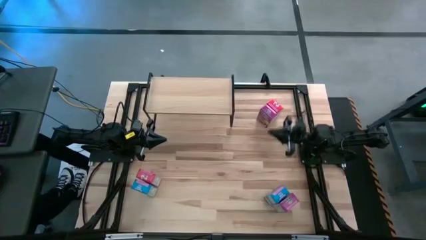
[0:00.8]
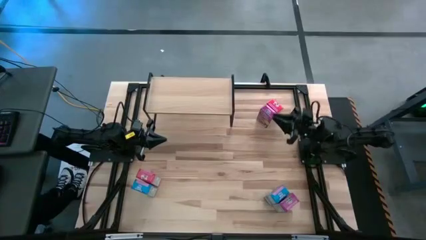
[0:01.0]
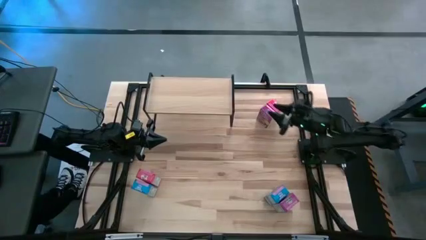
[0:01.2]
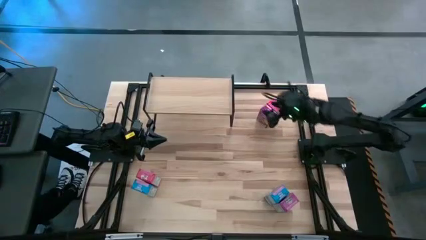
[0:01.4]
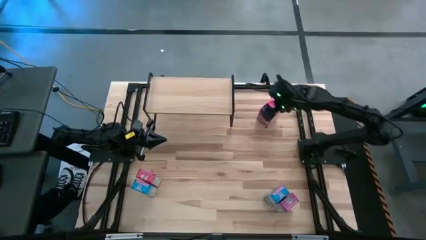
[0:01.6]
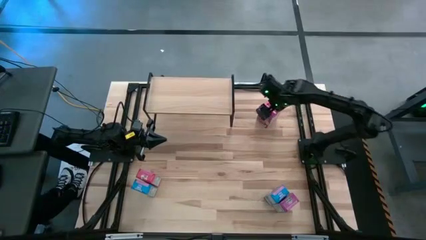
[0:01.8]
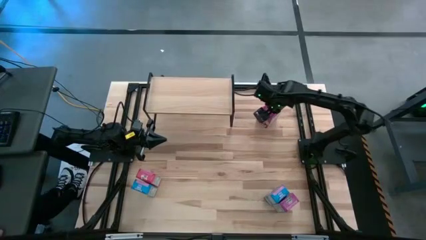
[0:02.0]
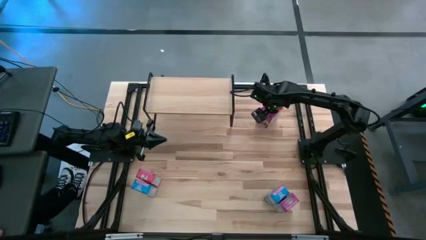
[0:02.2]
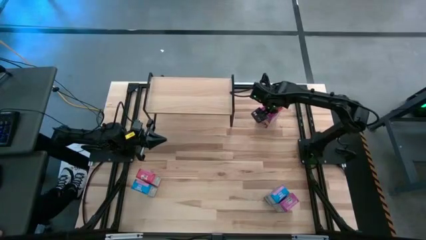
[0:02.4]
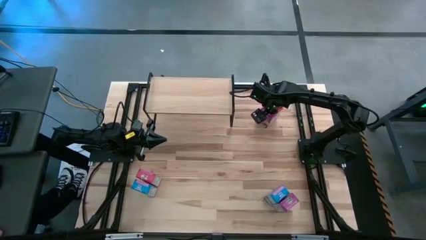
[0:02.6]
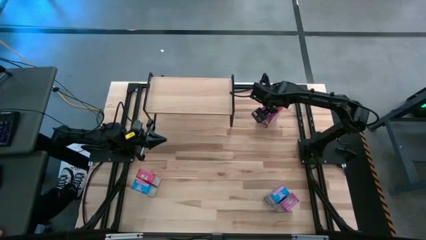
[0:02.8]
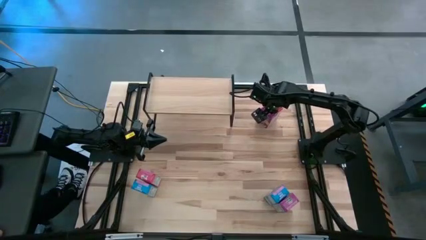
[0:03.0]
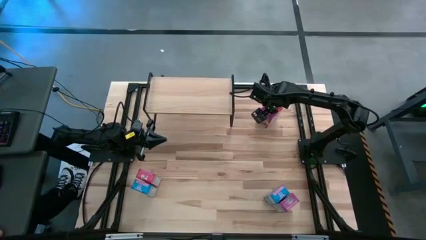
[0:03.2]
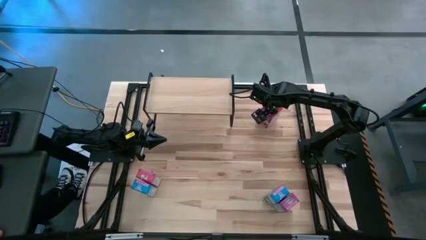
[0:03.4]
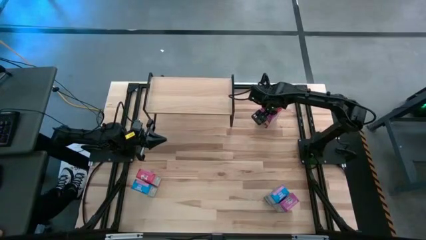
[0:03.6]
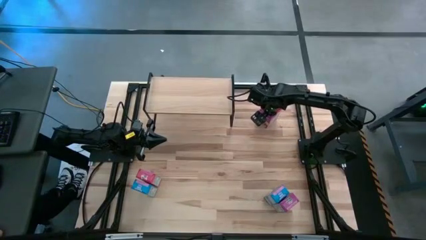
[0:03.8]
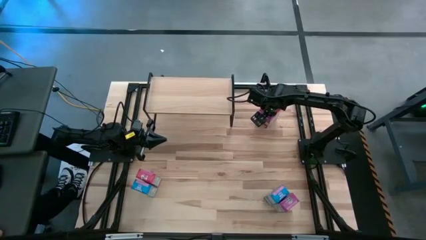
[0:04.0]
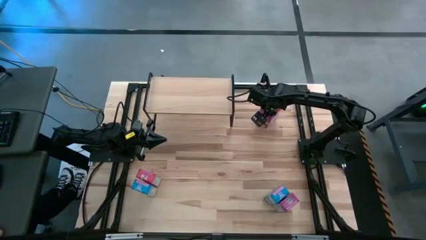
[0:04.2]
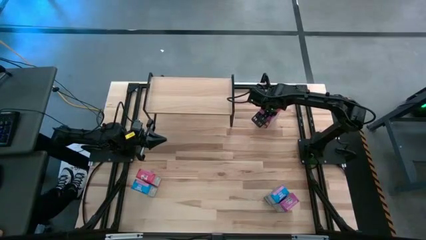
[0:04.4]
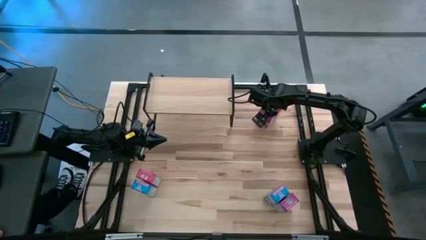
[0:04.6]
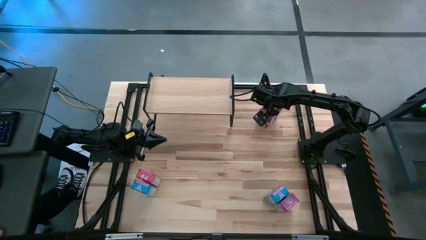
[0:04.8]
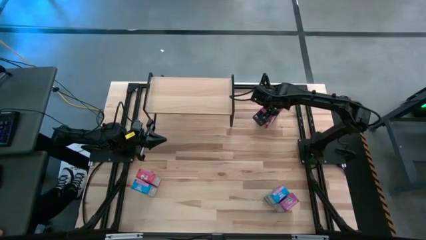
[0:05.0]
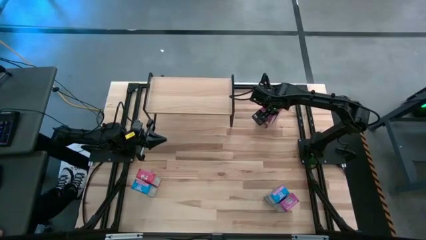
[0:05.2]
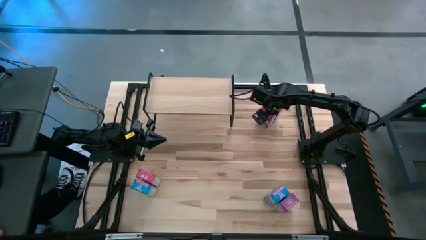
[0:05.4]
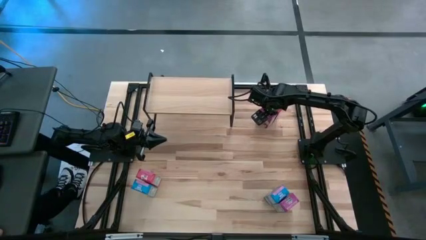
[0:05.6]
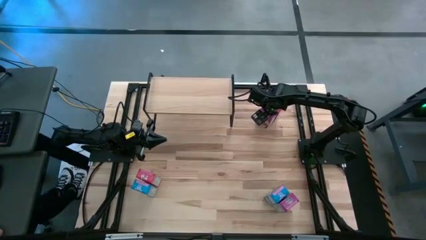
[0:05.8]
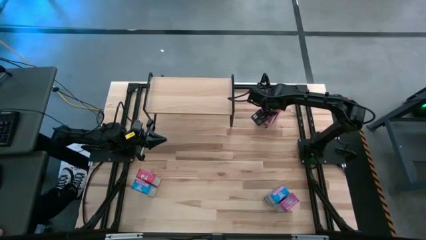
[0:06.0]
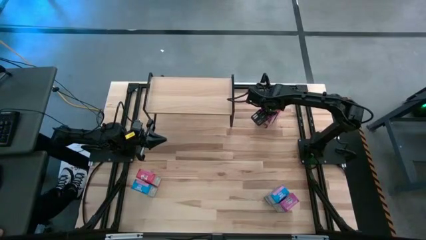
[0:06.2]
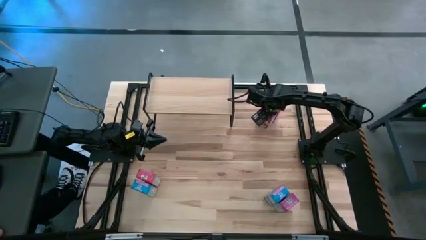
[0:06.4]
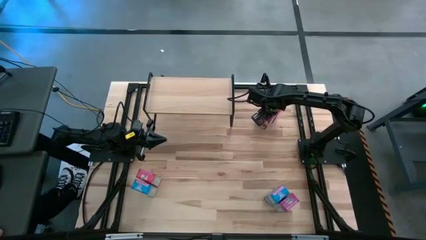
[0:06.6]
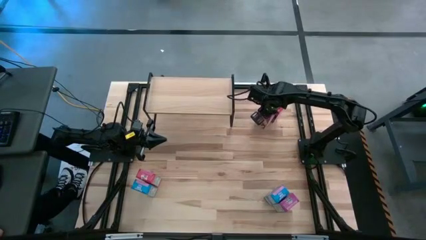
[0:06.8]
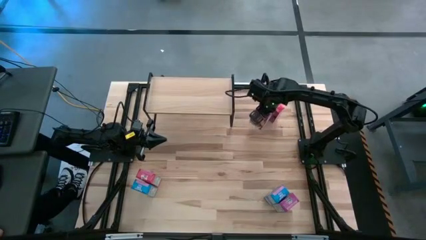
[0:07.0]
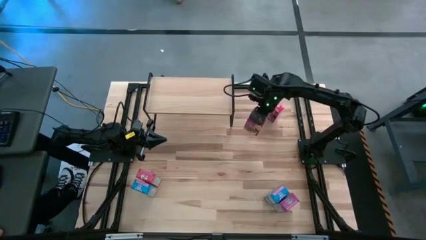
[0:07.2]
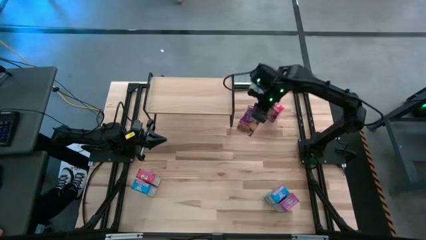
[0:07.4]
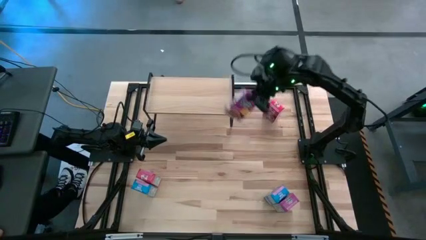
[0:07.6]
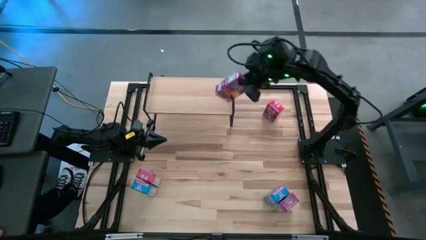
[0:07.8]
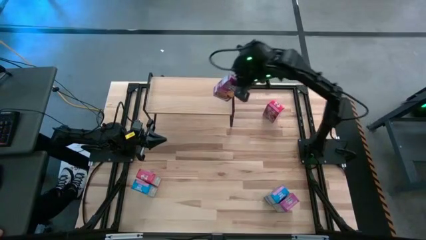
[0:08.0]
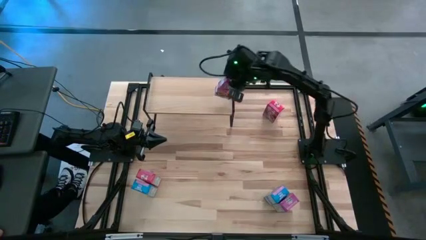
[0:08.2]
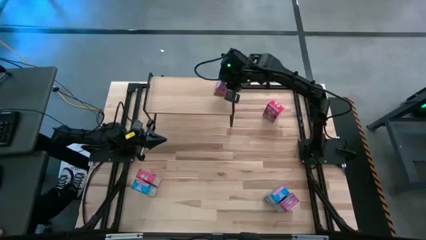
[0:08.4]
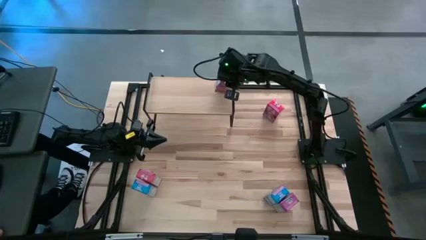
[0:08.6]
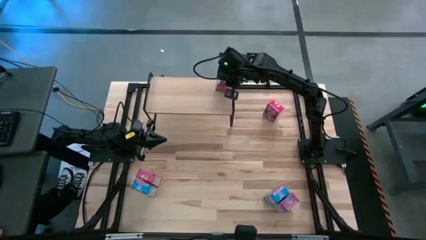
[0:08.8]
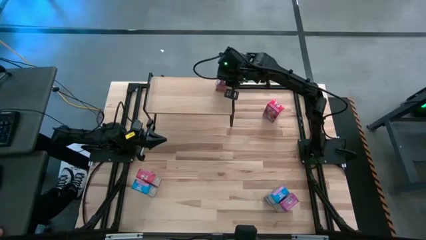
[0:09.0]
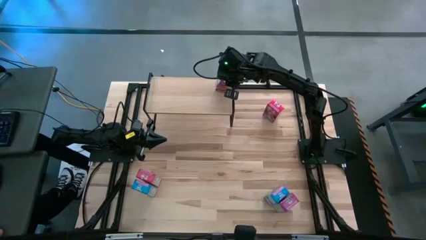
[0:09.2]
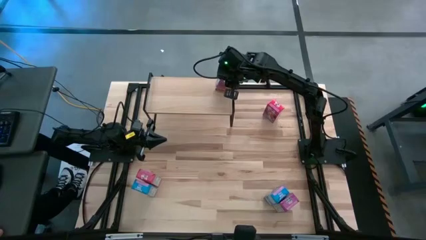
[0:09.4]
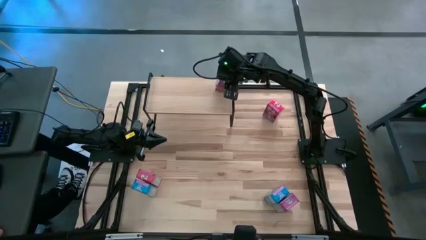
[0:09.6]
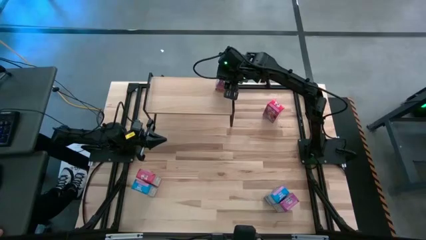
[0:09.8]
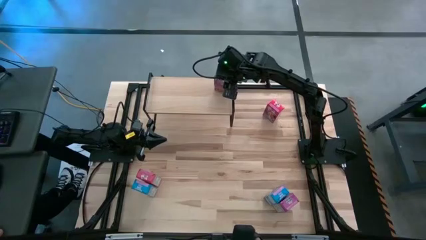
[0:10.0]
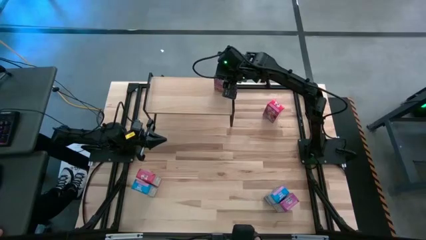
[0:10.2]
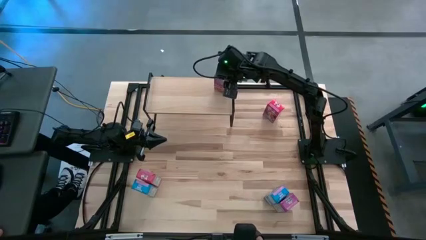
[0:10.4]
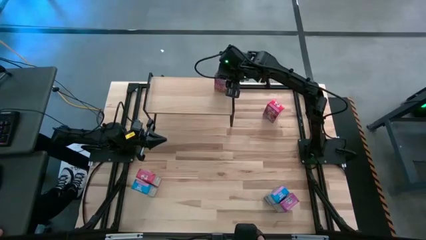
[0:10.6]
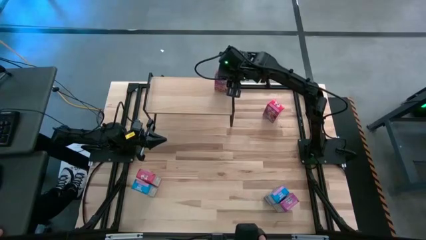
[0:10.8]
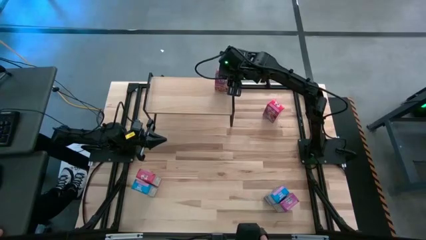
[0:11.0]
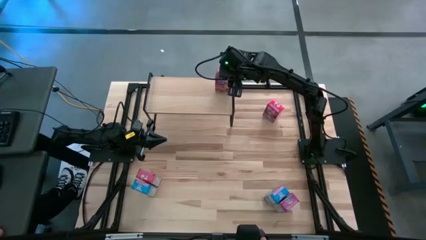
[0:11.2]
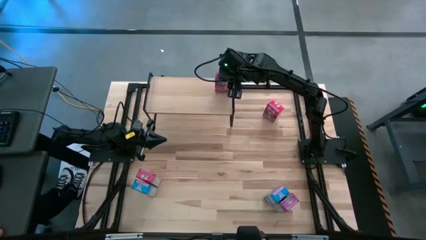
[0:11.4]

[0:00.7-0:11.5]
Task: Stack cereal on shelf
Put the top purple cereal box on the shelf
